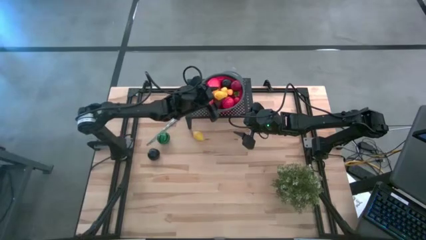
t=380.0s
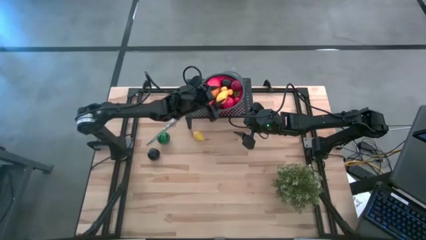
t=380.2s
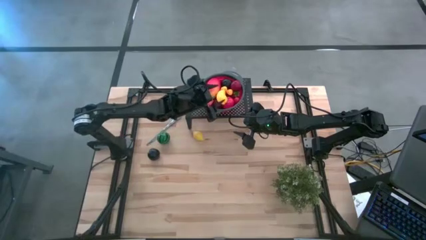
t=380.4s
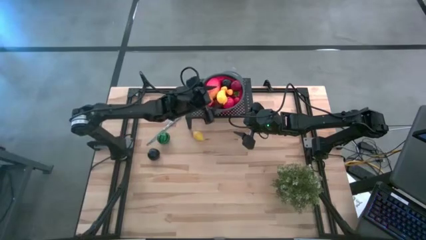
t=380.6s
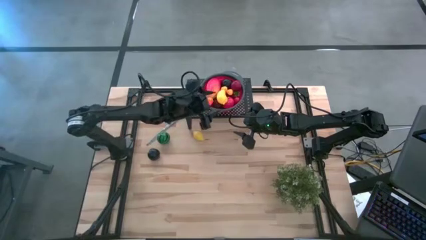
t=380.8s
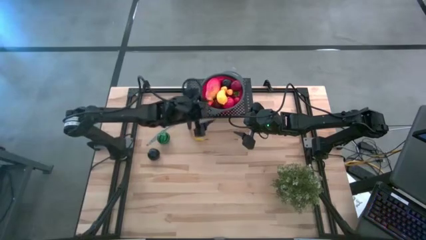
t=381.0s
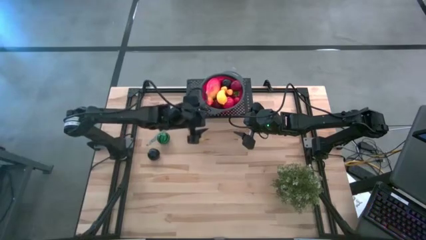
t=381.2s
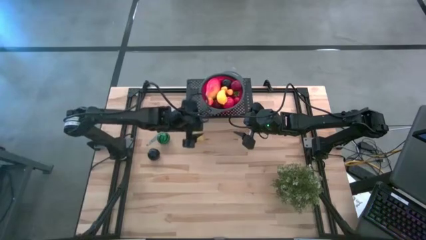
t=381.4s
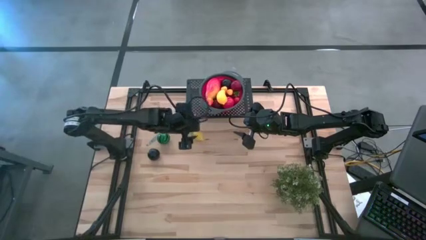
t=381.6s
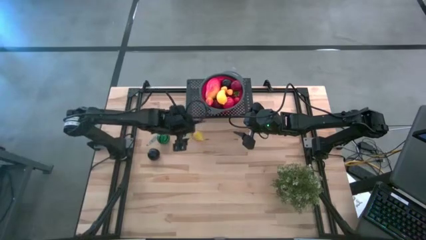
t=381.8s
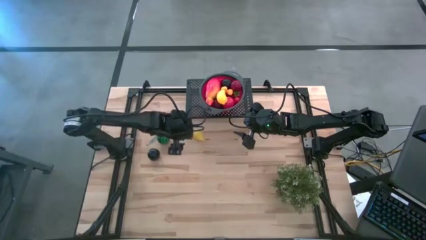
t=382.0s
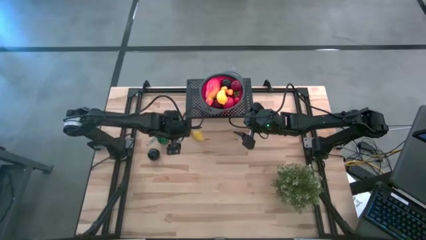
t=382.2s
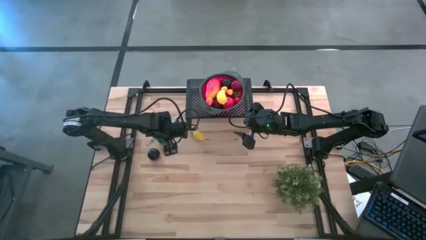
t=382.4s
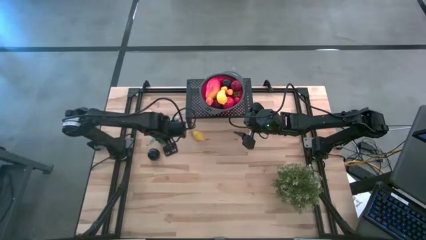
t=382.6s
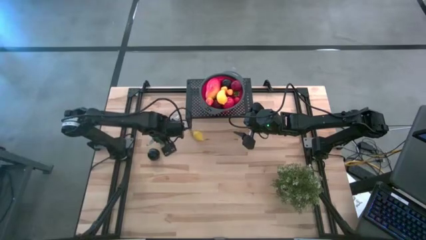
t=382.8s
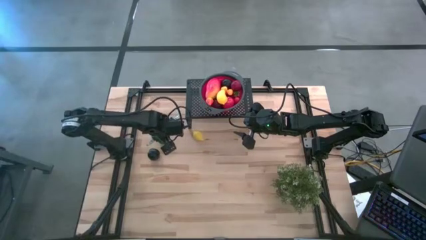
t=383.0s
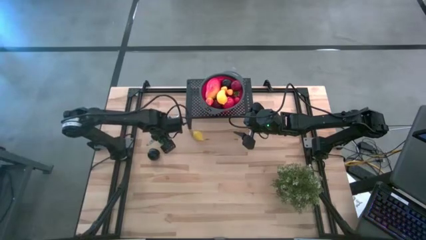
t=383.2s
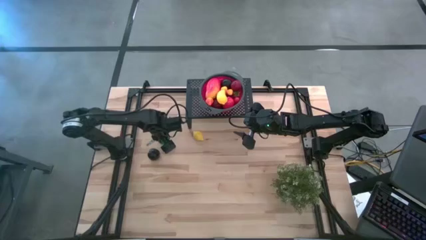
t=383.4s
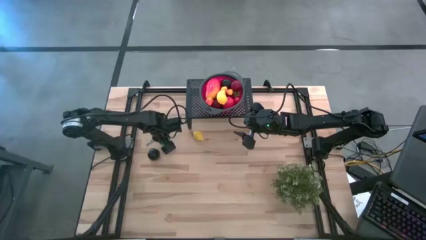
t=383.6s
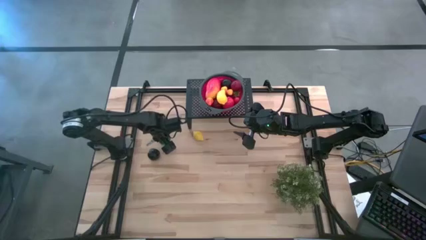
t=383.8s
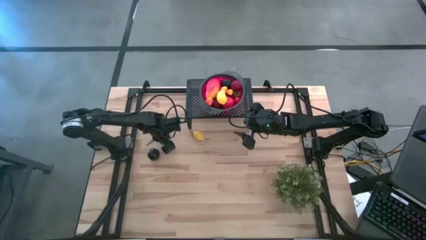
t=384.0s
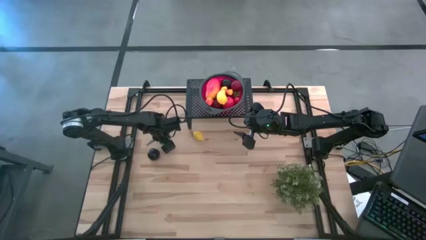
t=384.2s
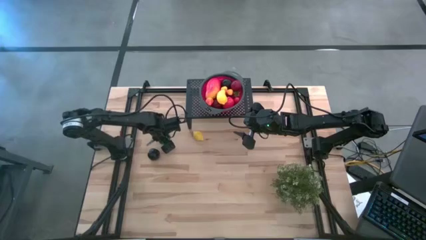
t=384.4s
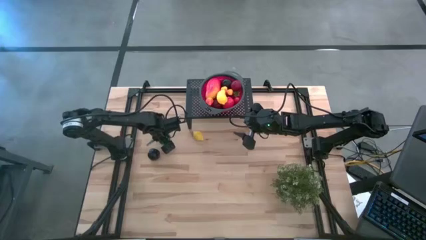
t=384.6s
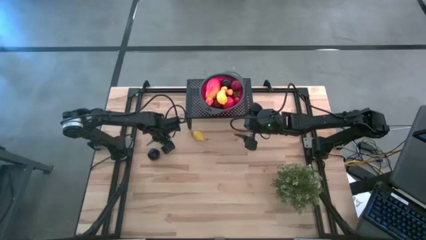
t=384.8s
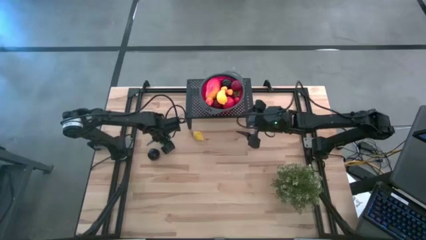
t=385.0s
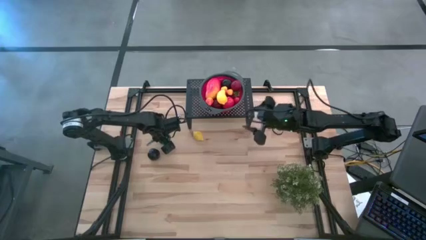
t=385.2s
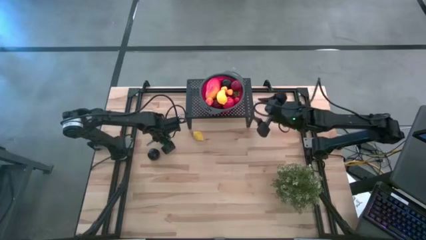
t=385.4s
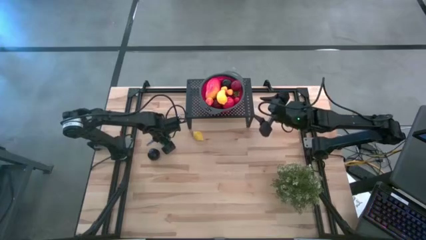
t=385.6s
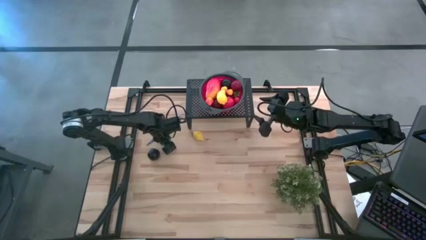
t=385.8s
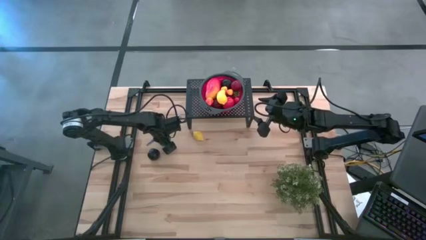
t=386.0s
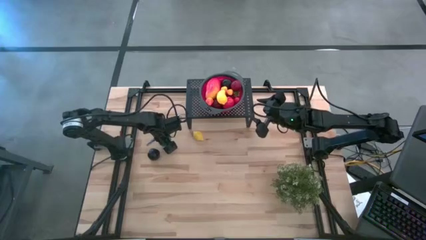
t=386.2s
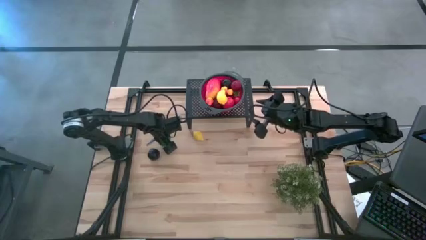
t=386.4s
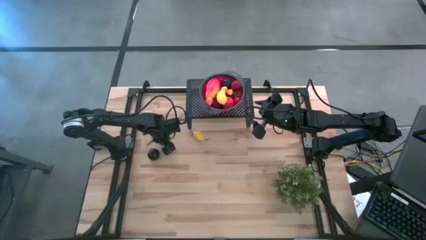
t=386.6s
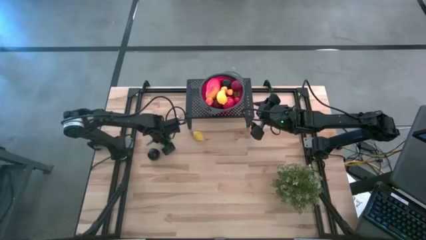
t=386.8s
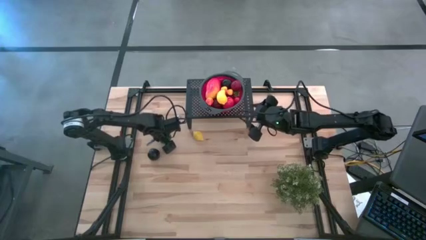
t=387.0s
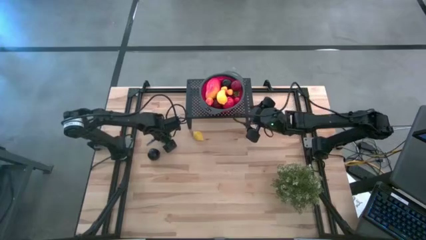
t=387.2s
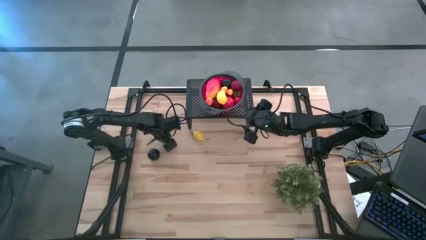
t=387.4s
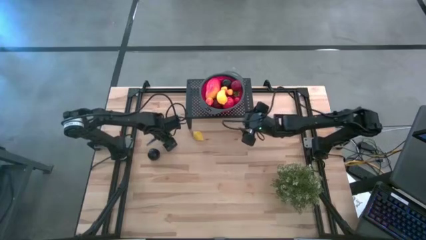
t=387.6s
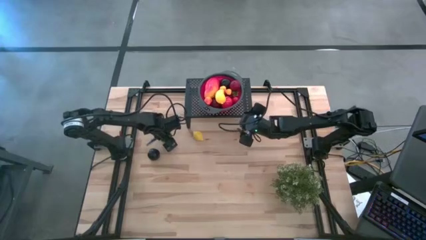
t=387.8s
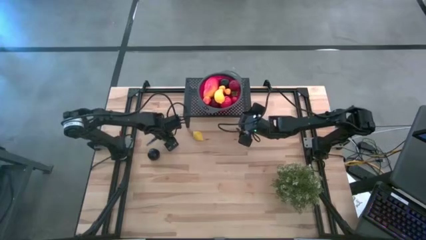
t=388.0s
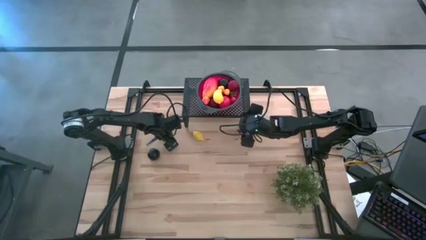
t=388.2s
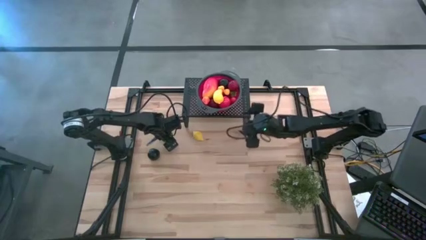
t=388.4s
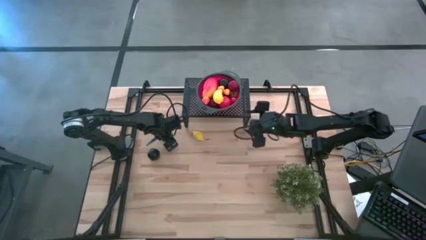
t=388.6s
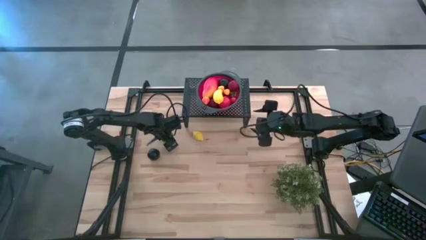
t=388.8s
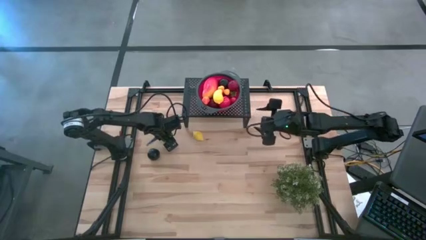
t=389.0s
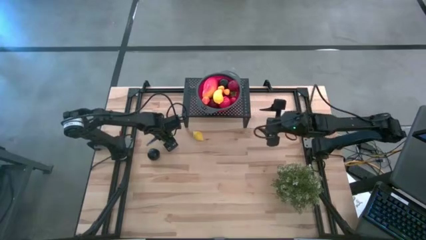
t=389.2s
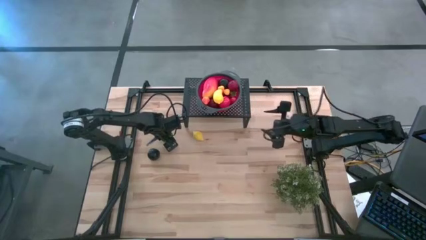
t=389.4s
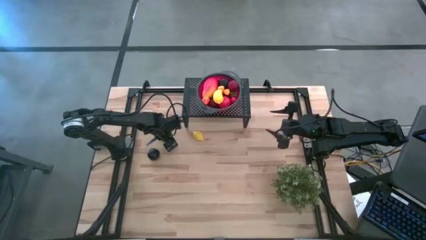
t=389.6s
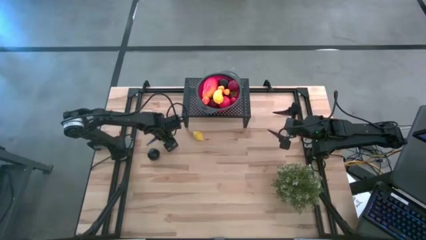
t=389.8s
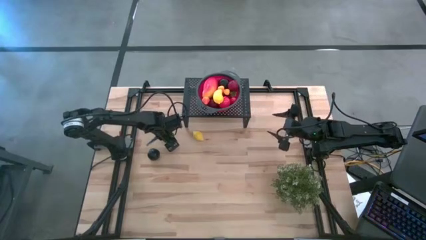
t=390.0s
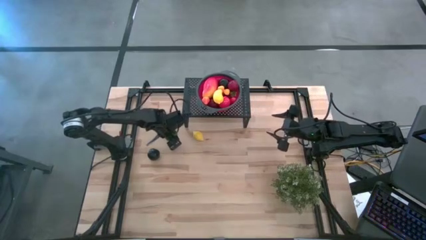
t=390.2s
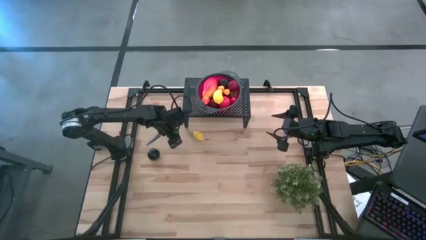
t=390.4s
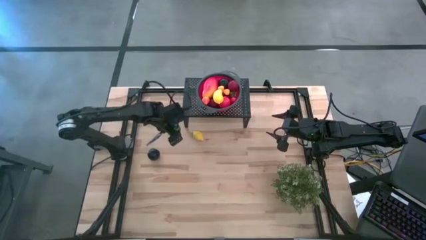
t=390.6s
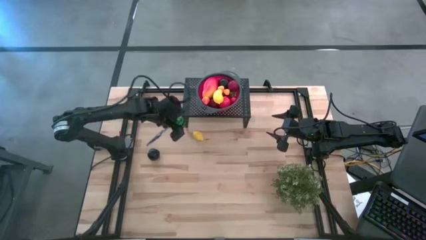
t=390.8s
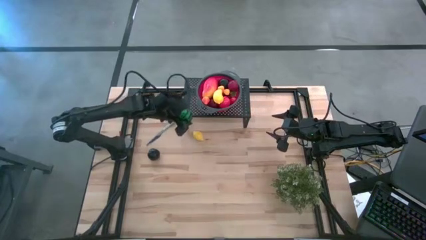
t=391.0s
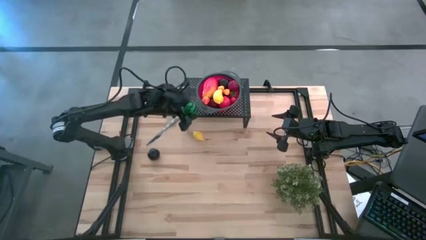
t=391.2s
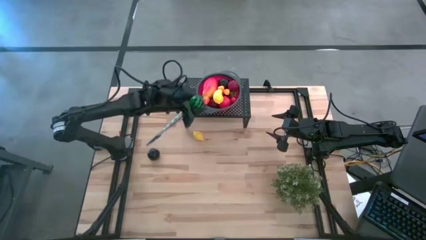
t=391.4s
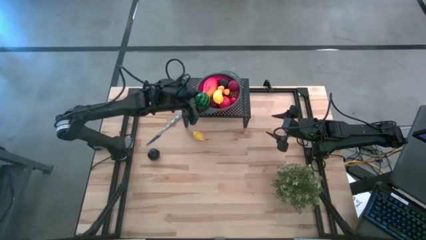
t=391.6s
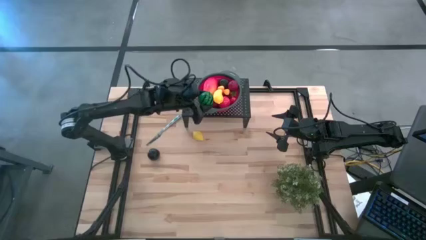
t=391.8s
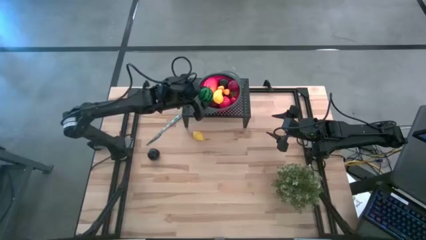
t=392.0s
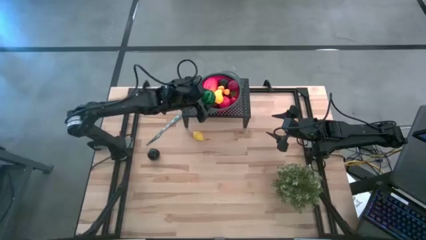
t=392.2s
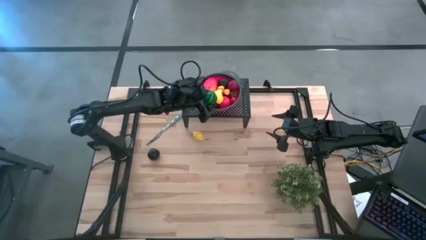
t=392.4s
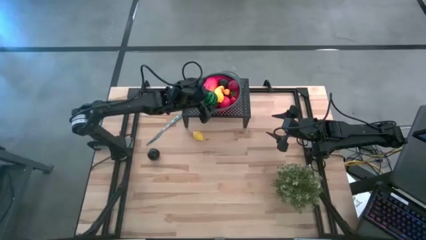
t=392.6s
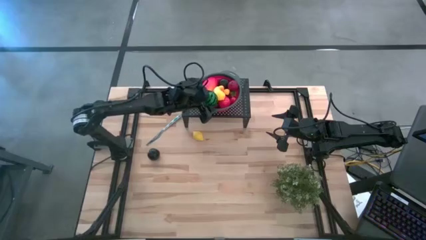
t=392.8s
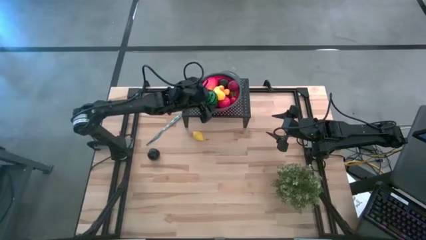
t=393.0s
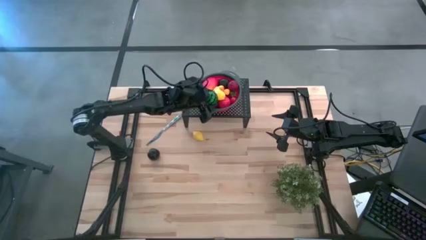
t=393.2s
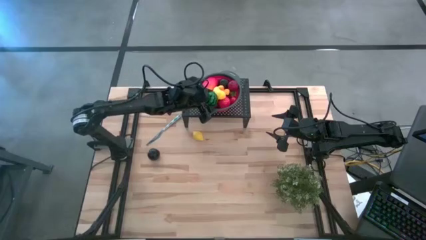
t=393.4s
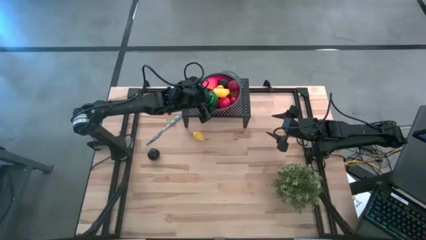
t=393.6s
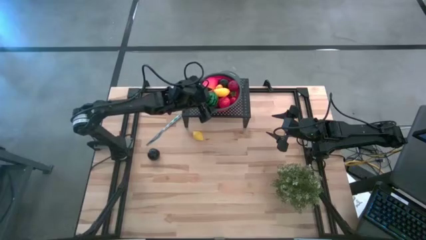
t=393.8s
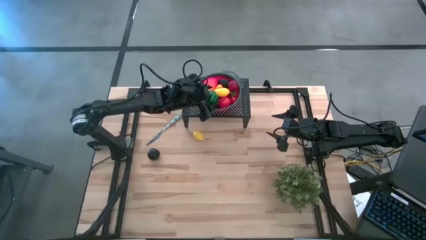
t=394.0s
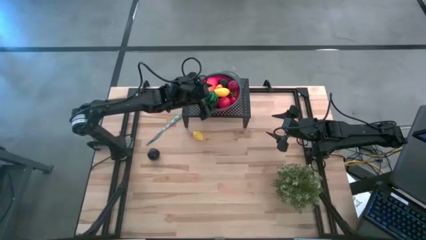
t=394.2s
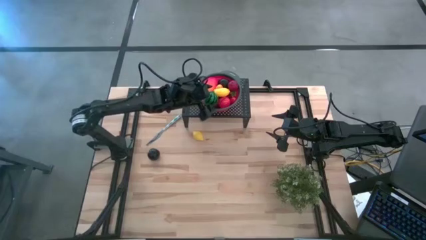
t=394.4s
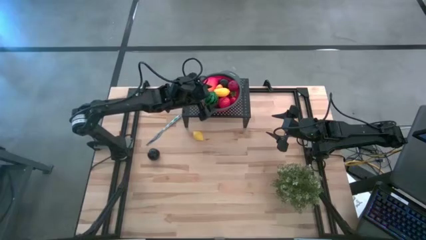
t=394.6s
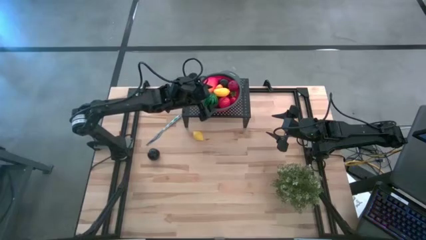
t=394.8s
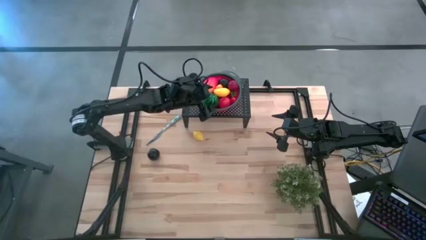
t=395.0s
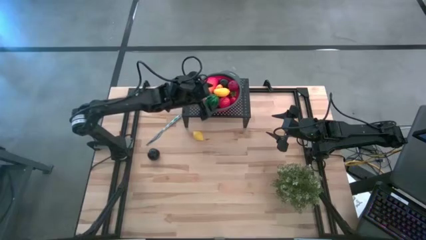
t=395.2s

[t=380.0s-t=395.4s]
Task: Pick & Place Fruit
Put the watermelon in the red colander on the shelf
